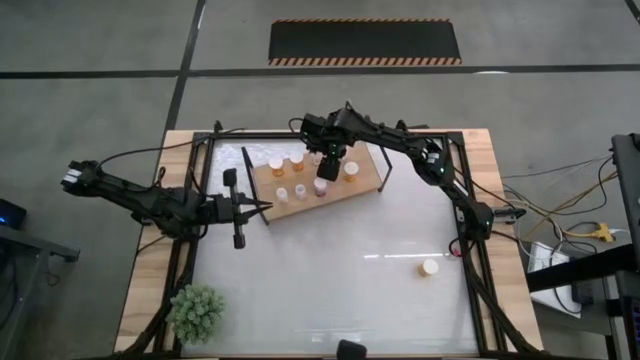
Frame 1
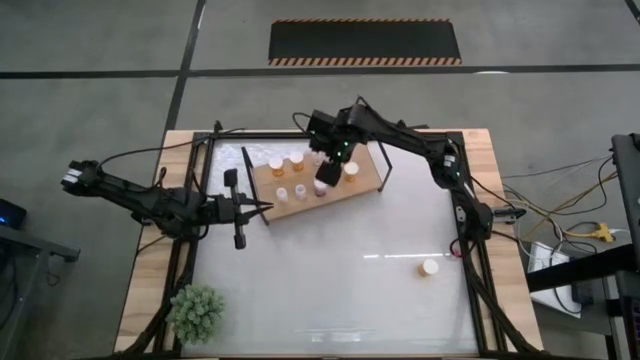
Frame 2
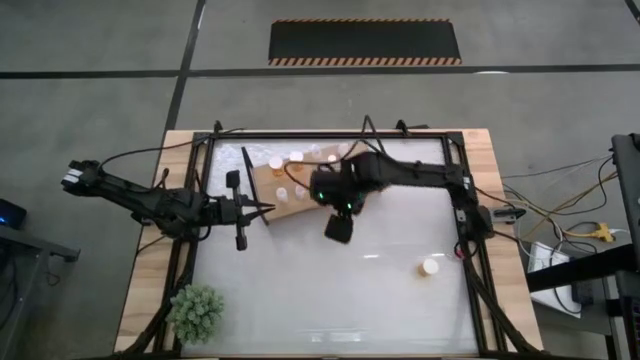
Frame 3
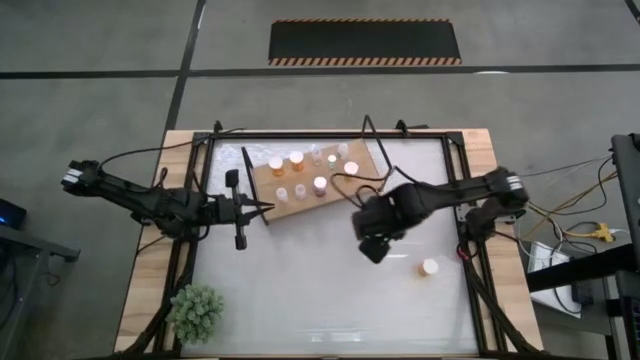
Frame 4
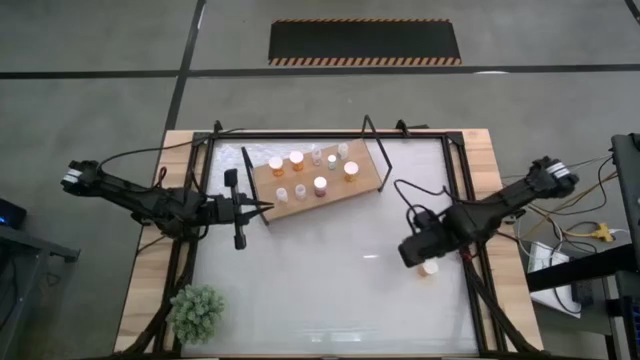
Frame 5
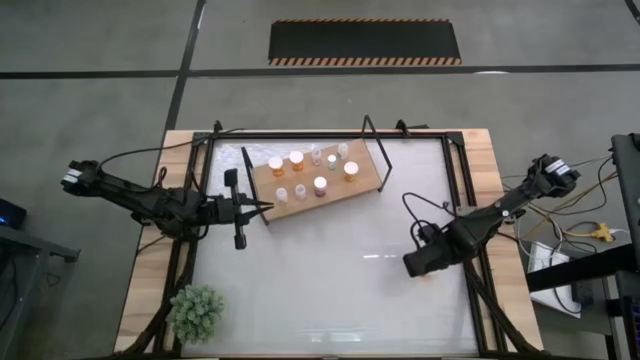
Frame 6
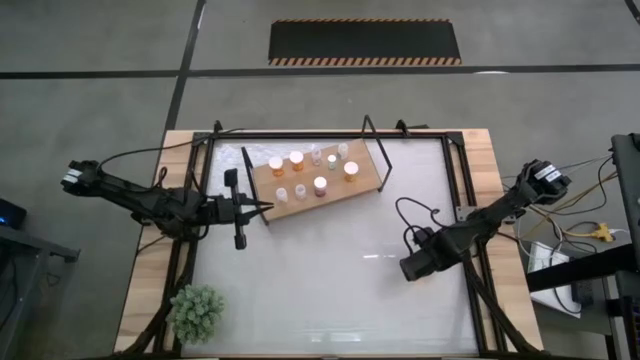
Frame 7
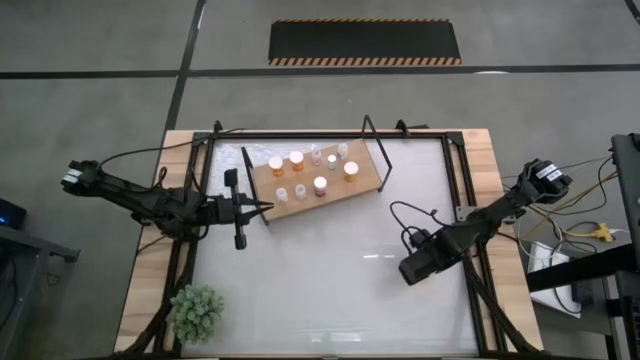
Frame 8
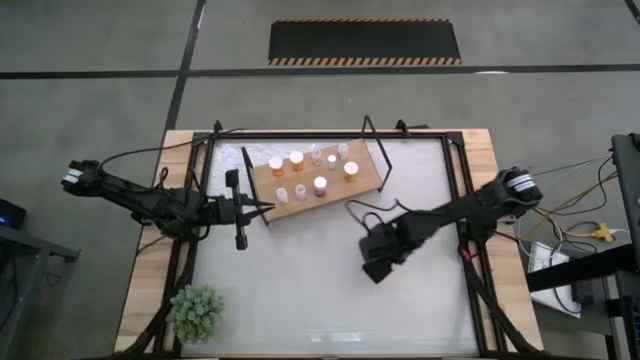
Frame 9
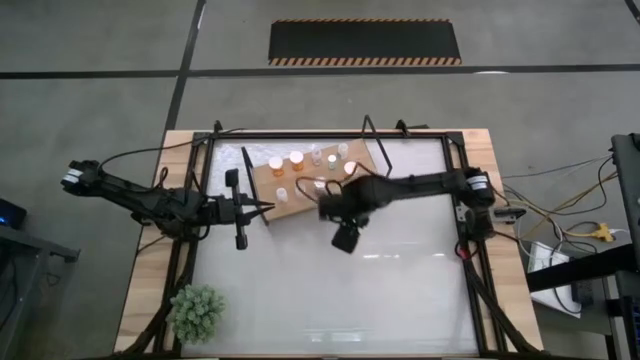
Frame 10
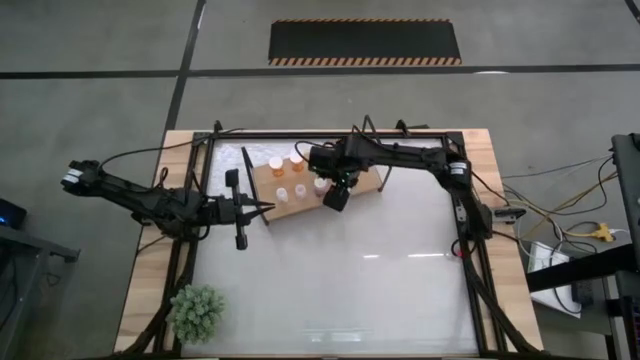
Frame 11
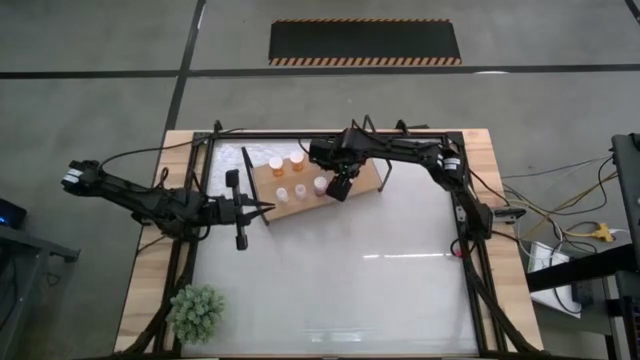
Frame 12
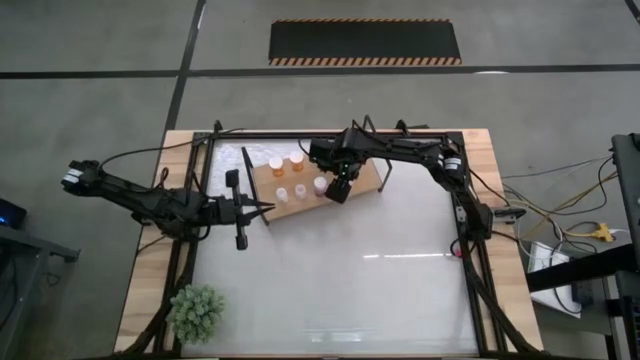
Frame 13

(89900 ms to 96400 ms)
Task: Pick and place medicine bottles onto shelf by color
Put the orange pill bottle on the shelf

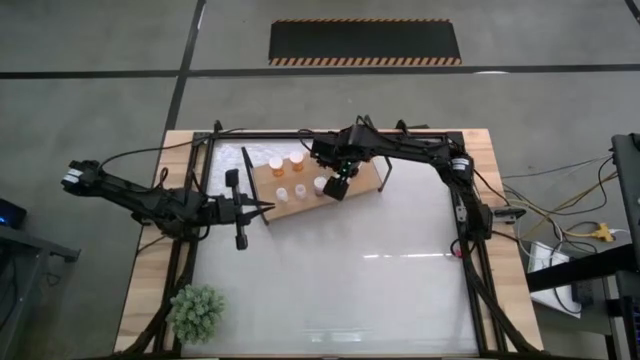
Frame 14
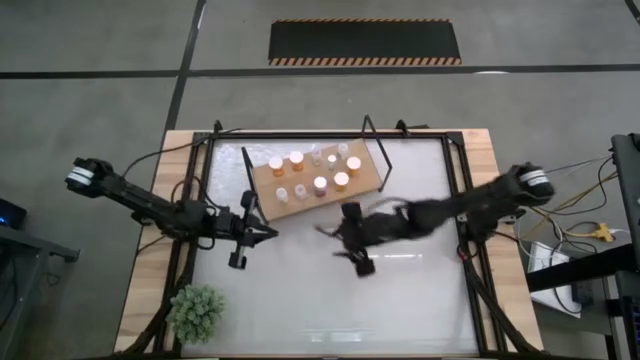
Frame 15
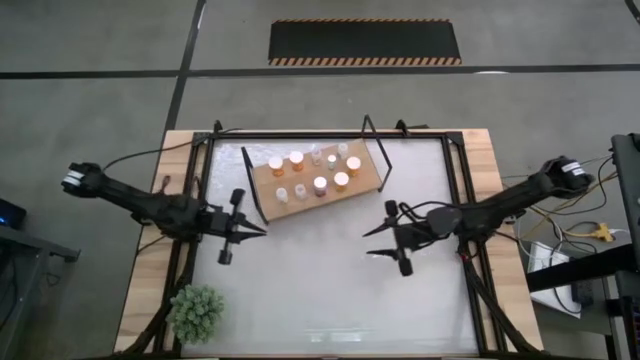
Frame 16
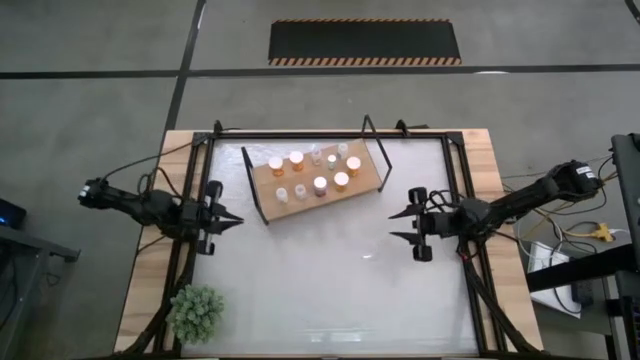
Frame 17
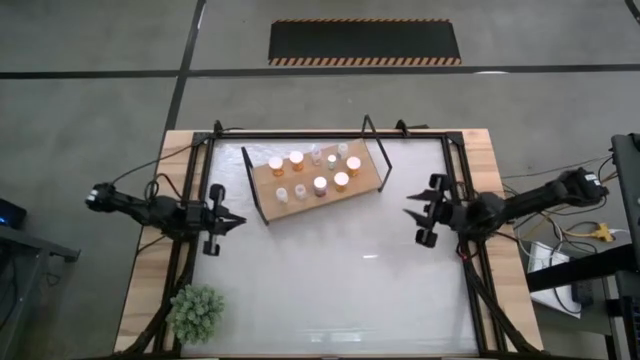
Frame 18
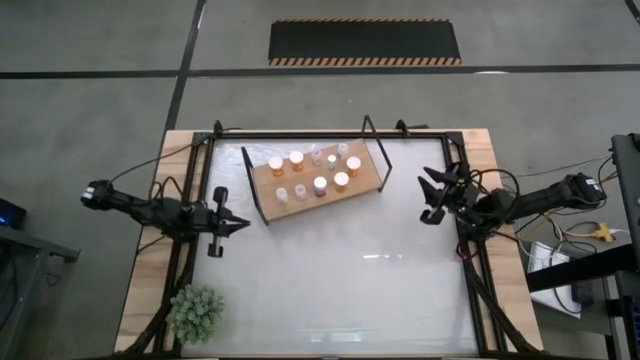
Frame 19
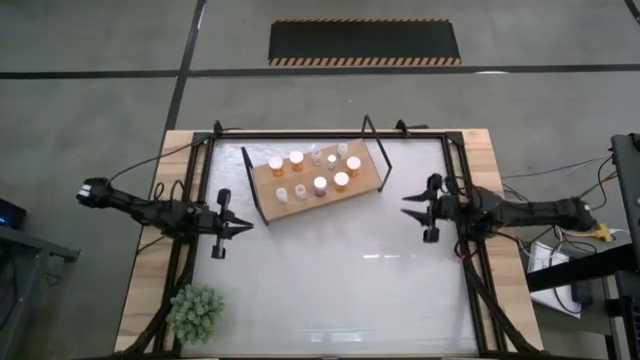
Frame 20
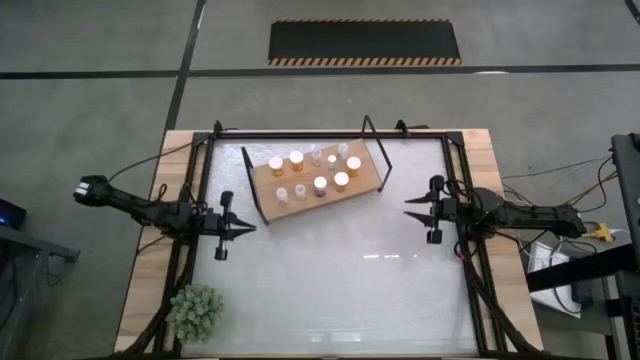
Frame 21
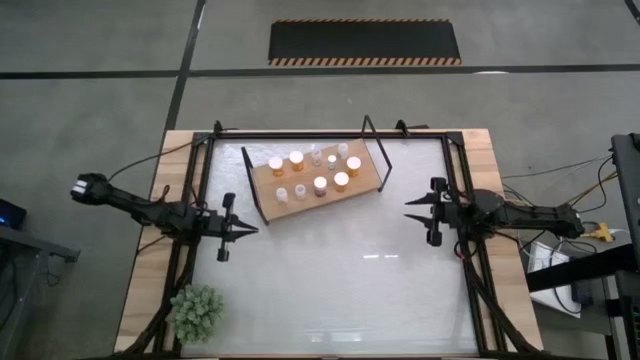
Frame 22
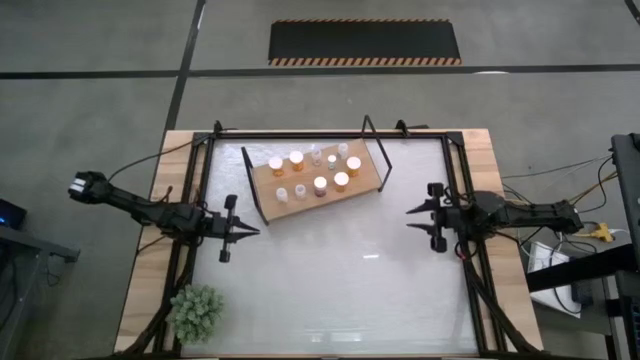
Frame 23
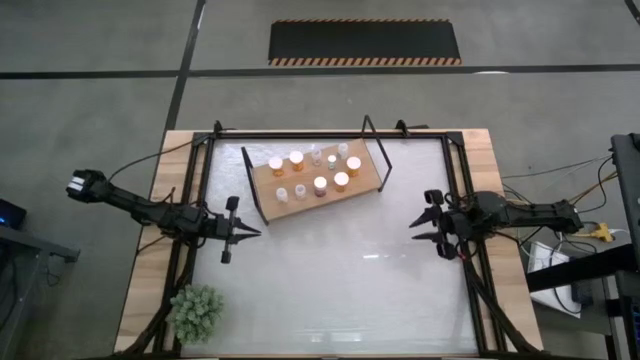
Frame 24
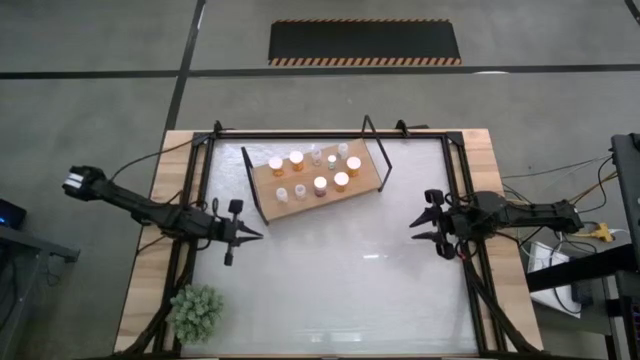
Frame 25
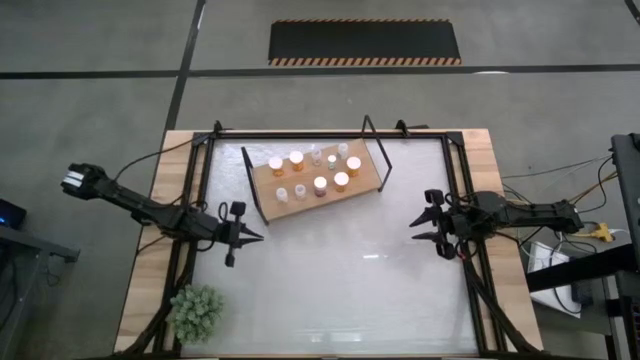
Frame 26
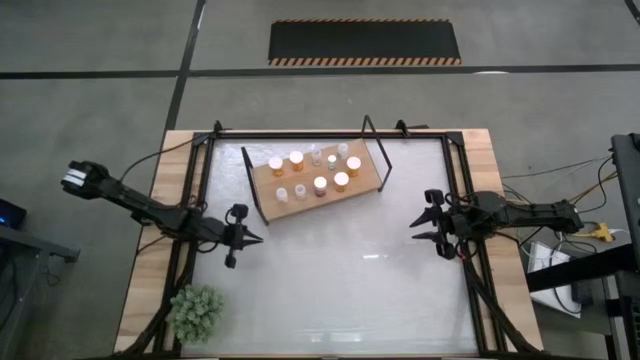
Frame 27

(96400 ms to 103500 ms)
Return to Home Position

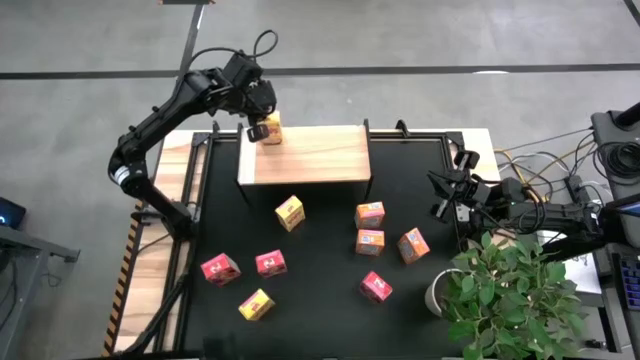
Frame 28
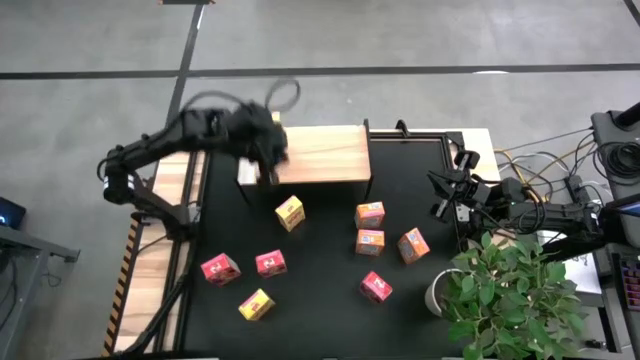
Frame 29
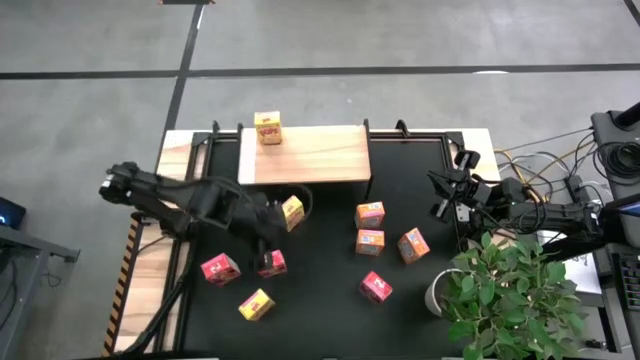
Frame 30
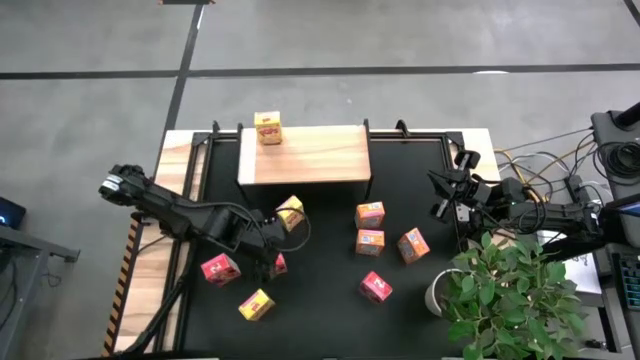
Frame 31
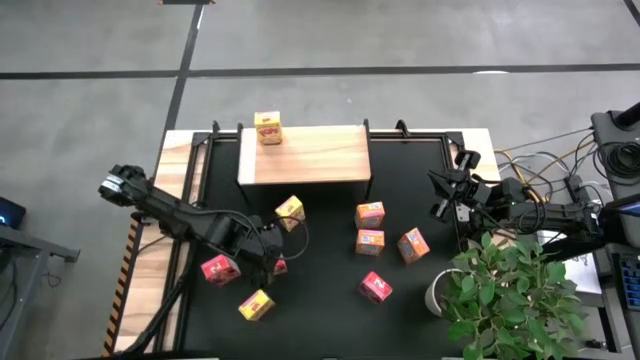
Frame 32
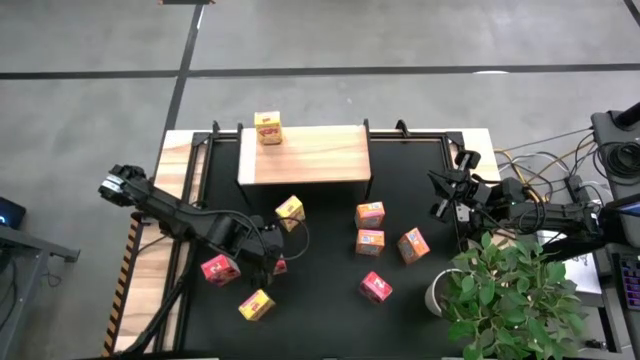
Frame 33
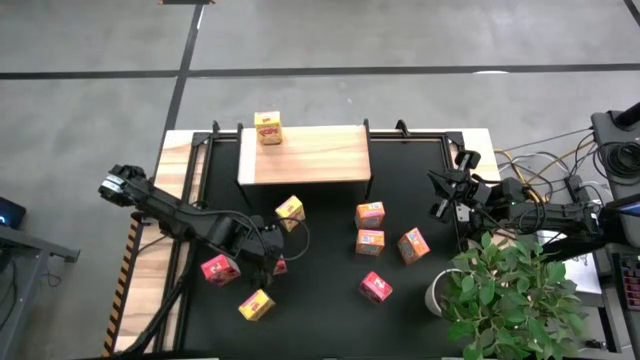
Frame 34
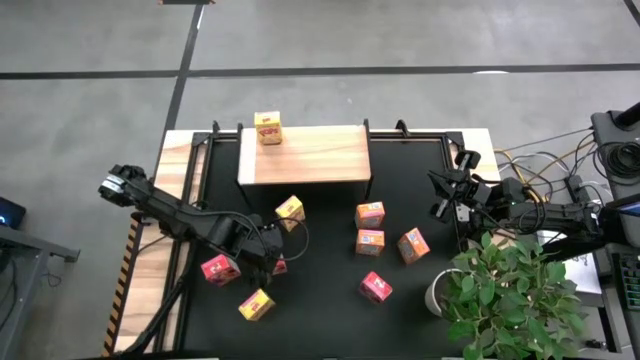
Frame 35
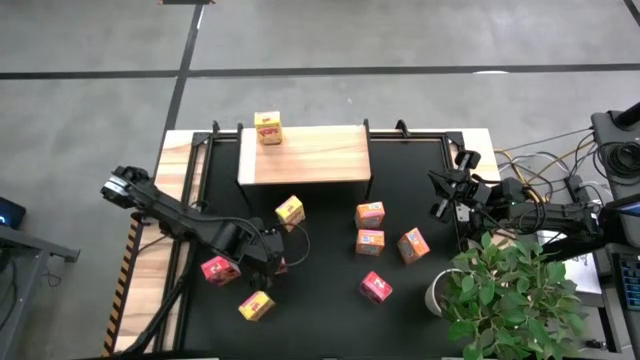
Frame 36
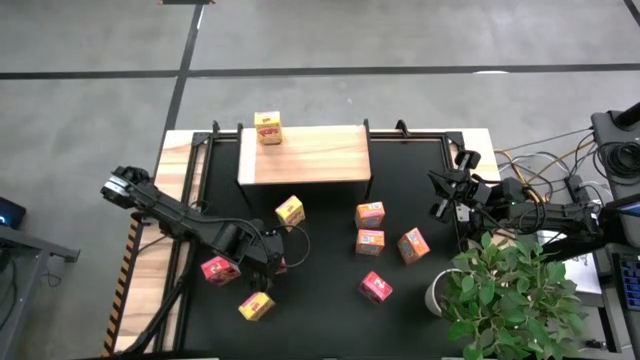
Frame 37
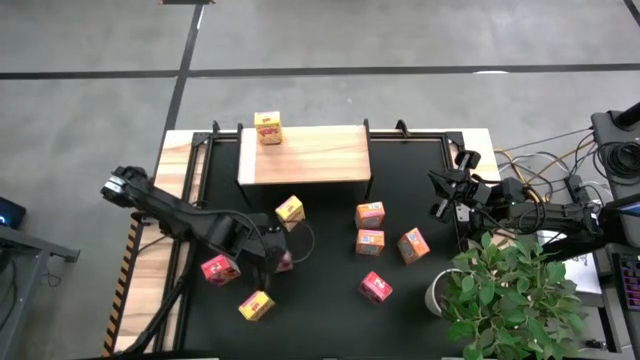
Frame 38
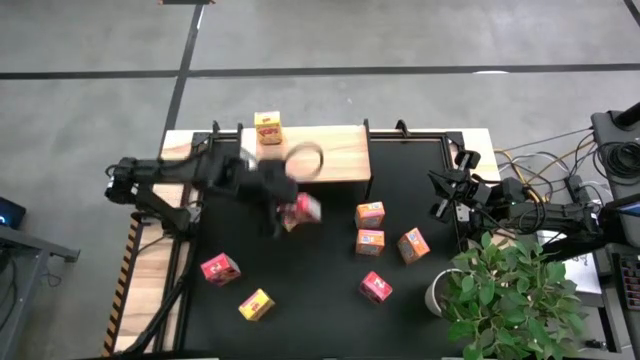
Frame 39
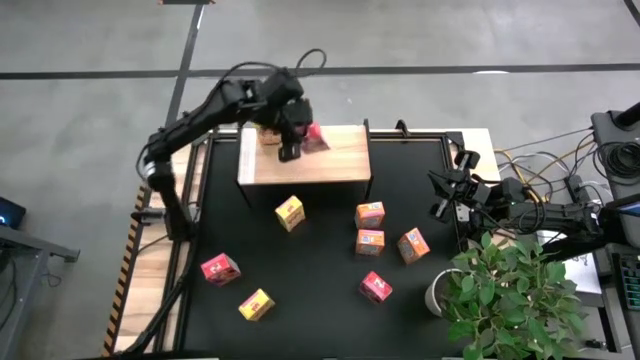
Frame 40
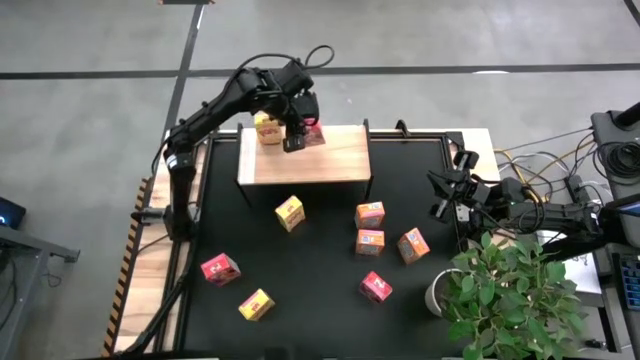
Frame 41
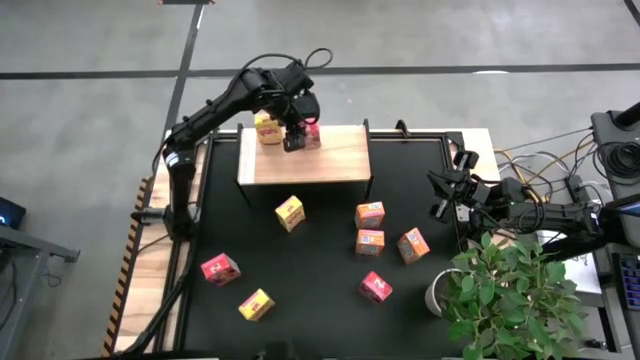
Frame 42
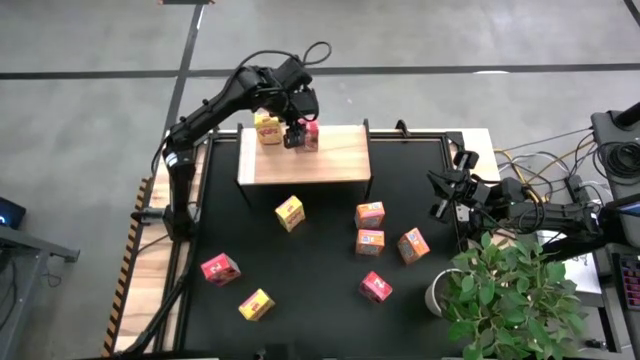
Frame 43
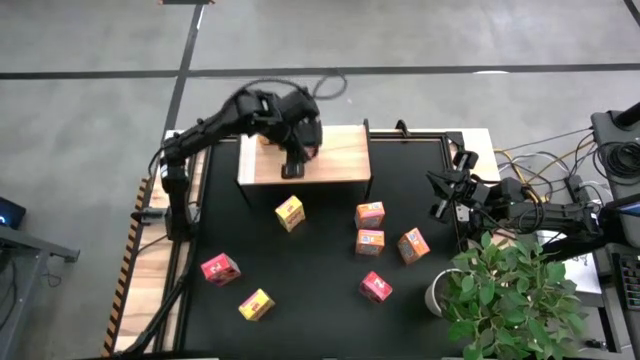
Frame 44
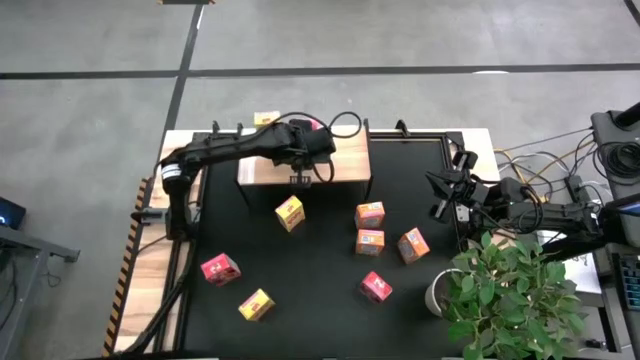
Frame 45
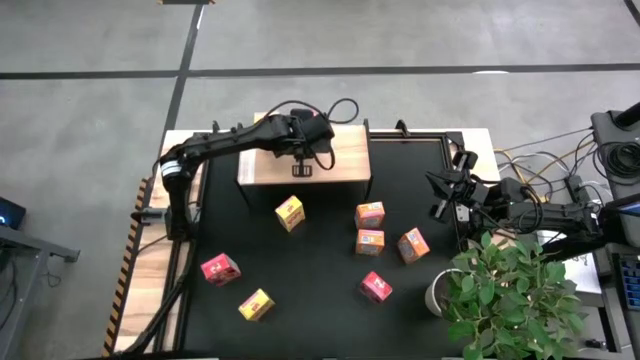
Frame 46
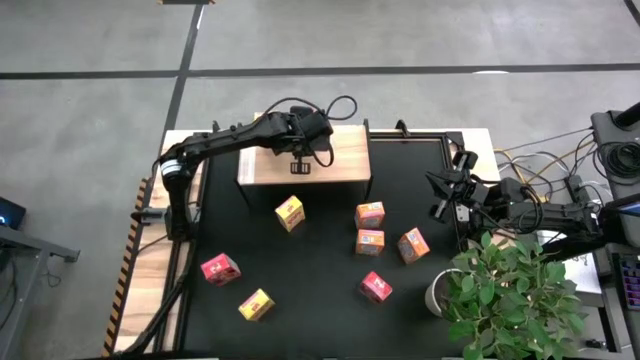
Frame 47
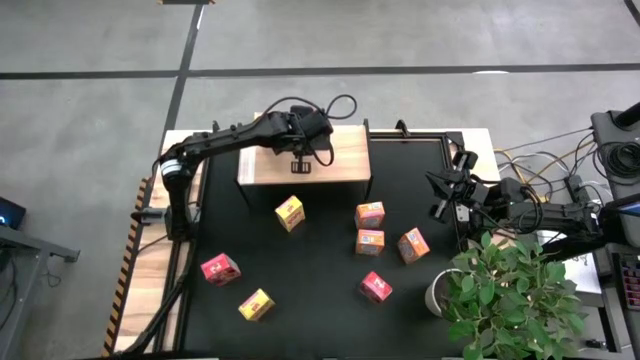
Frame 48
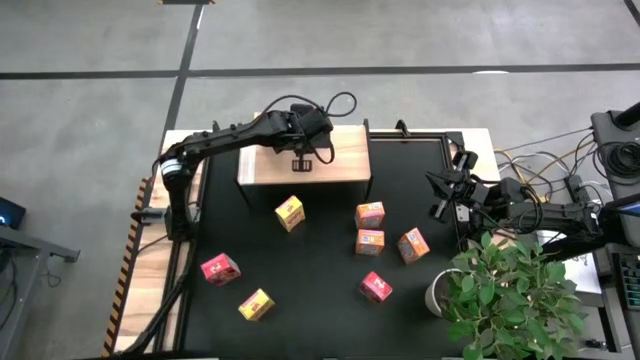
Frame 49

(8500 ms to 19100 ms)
Task: Stack cereal on shelf
Put the top right red cereal box on the shelf
